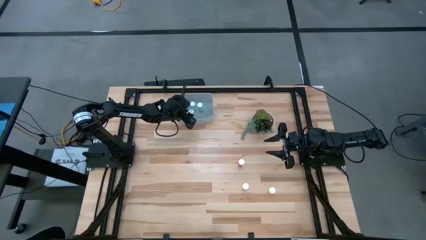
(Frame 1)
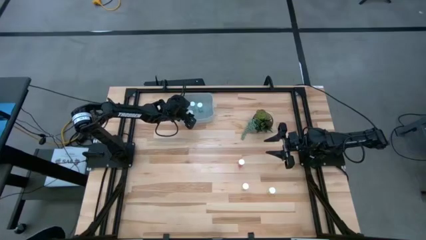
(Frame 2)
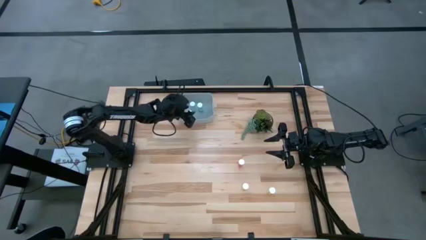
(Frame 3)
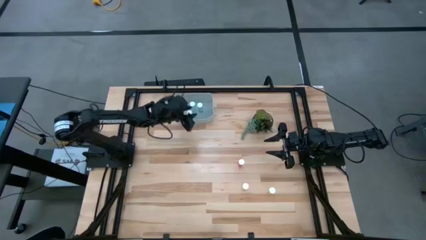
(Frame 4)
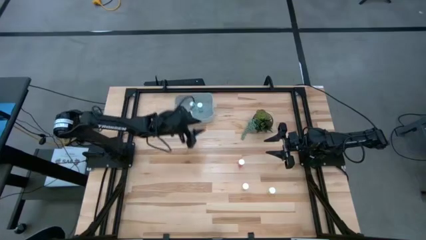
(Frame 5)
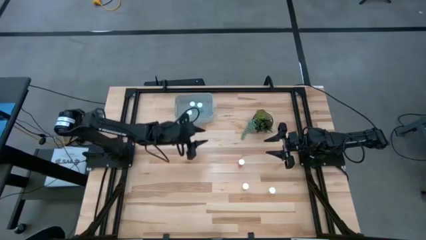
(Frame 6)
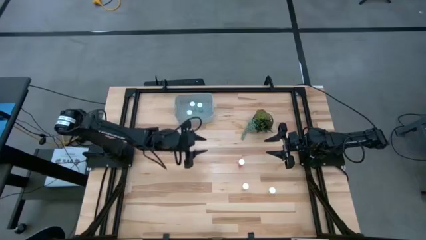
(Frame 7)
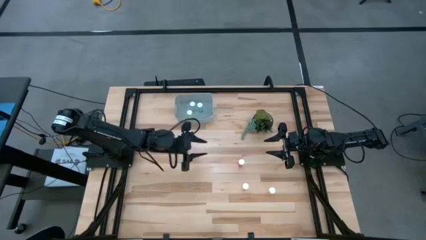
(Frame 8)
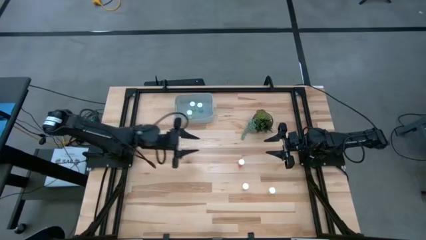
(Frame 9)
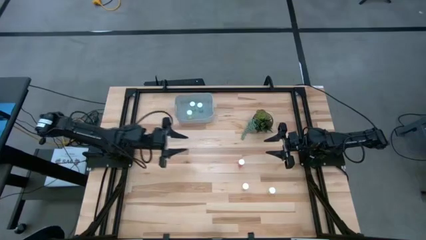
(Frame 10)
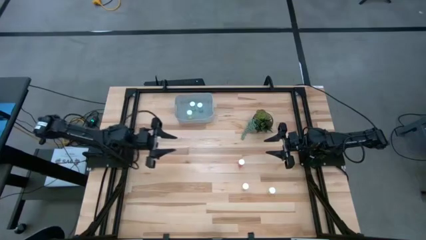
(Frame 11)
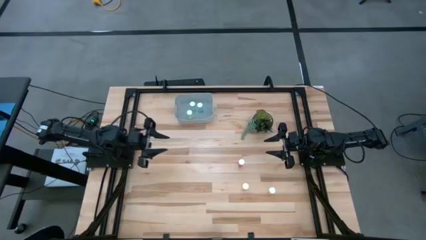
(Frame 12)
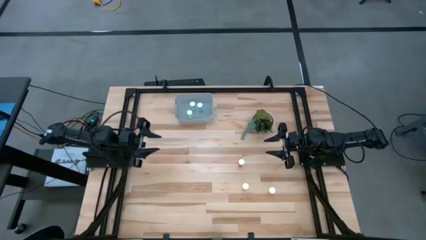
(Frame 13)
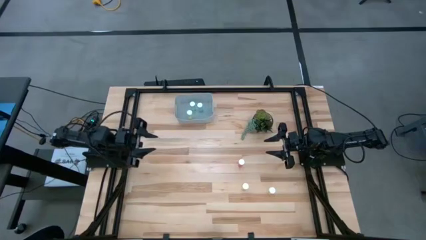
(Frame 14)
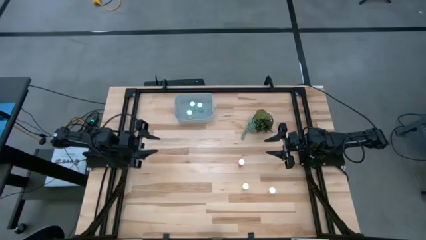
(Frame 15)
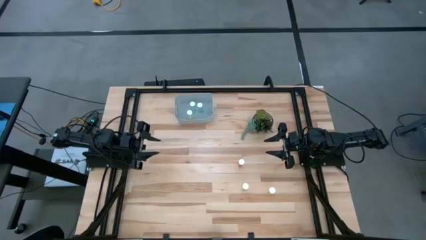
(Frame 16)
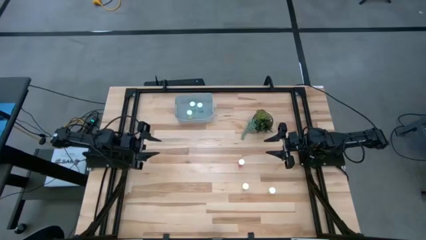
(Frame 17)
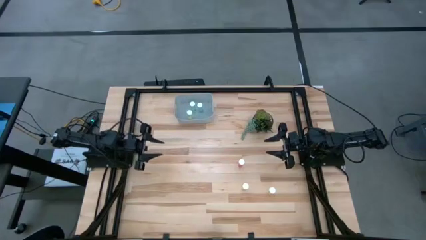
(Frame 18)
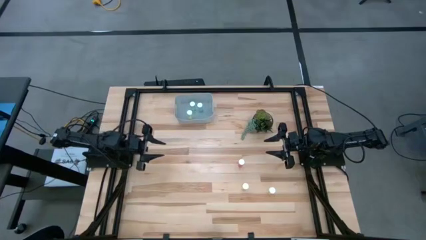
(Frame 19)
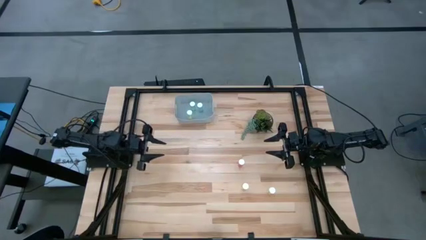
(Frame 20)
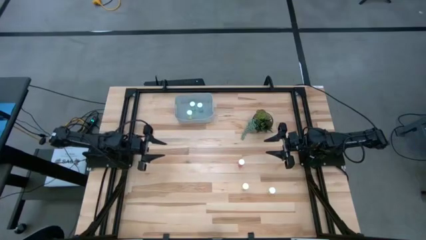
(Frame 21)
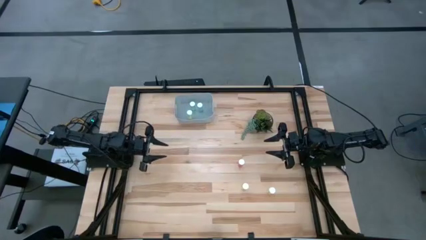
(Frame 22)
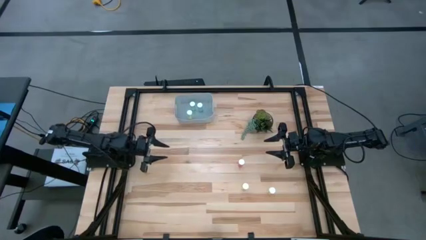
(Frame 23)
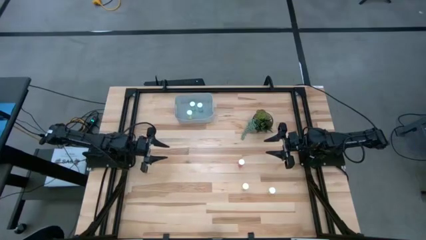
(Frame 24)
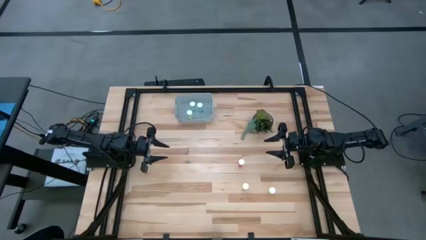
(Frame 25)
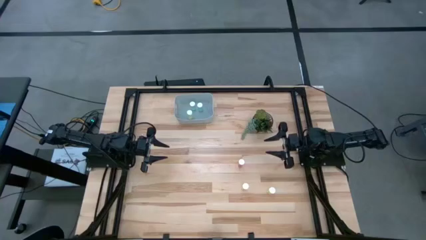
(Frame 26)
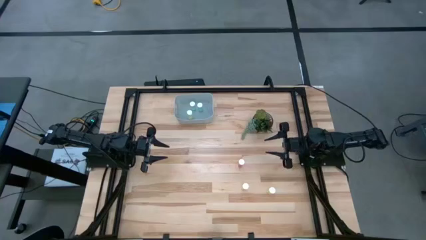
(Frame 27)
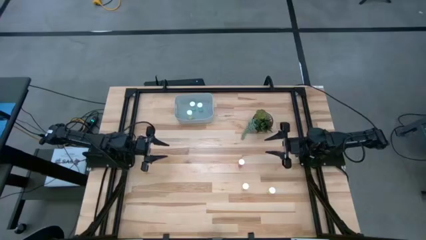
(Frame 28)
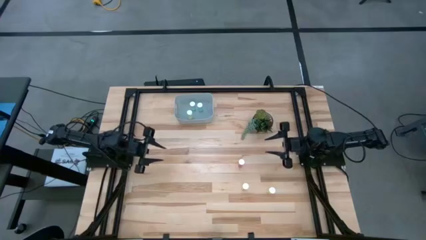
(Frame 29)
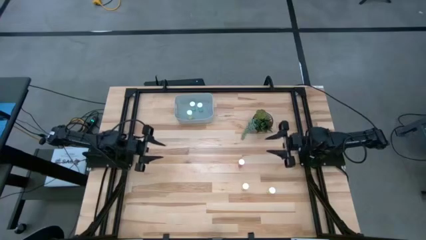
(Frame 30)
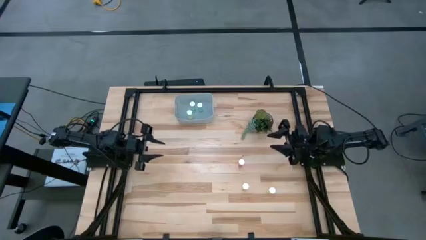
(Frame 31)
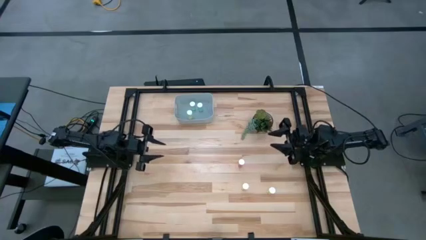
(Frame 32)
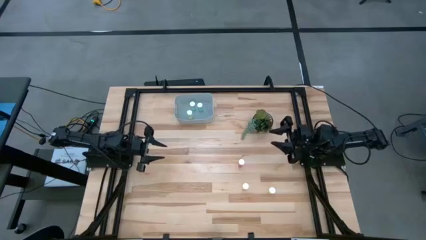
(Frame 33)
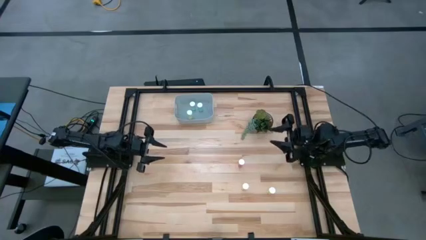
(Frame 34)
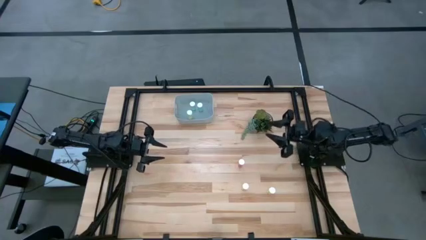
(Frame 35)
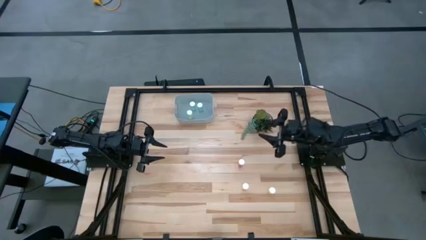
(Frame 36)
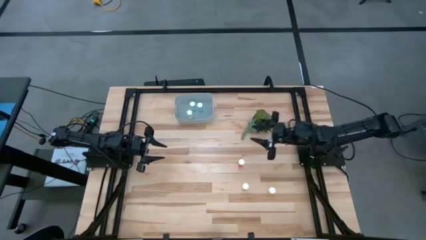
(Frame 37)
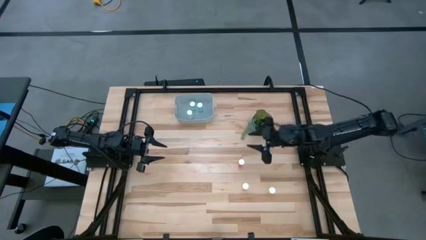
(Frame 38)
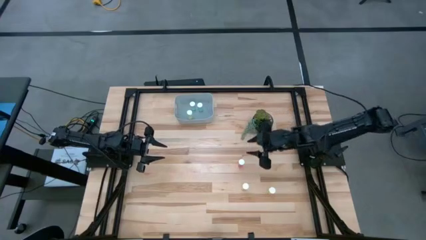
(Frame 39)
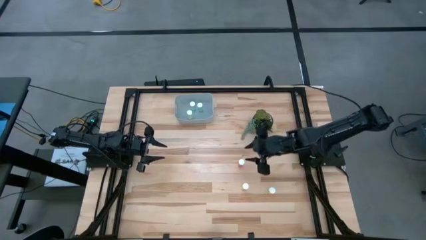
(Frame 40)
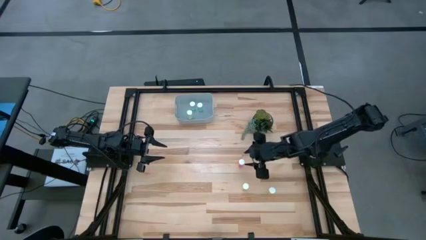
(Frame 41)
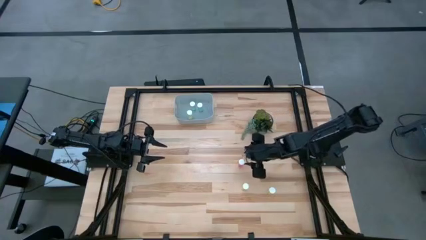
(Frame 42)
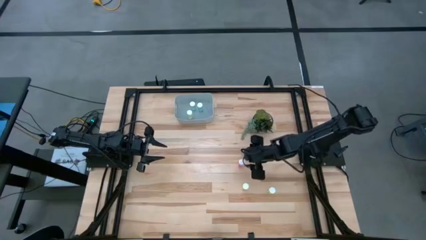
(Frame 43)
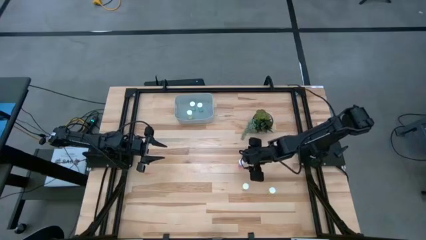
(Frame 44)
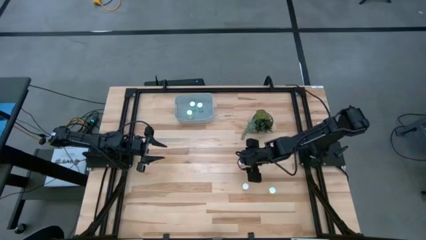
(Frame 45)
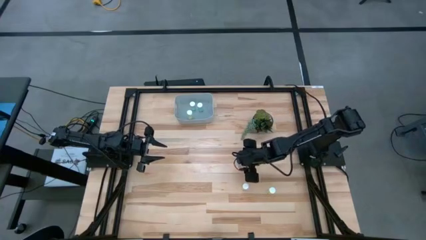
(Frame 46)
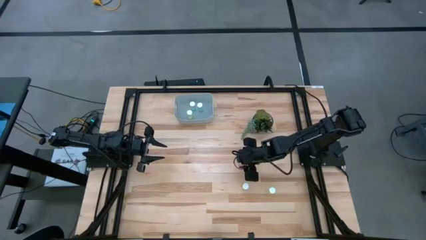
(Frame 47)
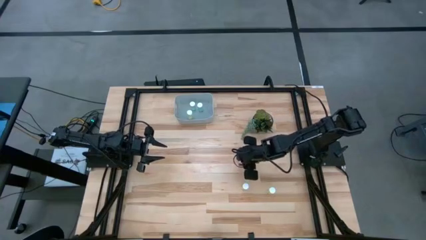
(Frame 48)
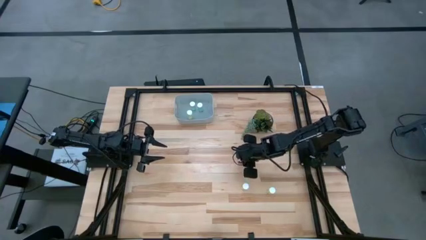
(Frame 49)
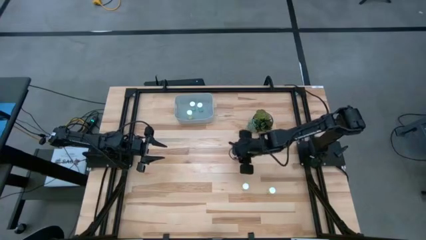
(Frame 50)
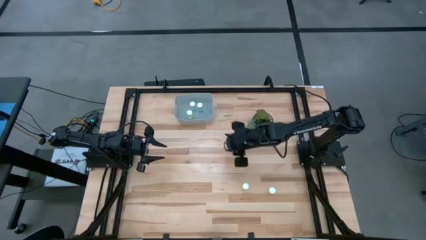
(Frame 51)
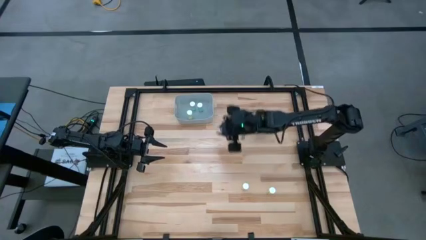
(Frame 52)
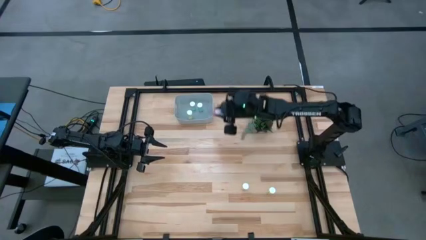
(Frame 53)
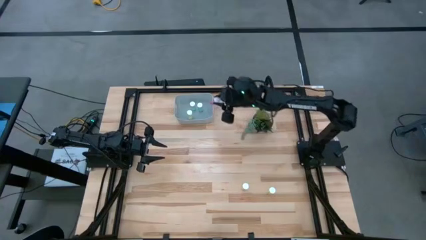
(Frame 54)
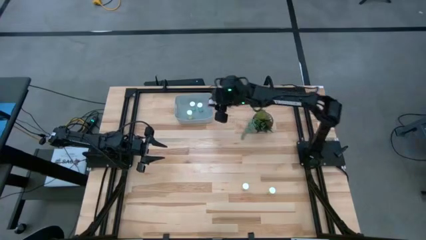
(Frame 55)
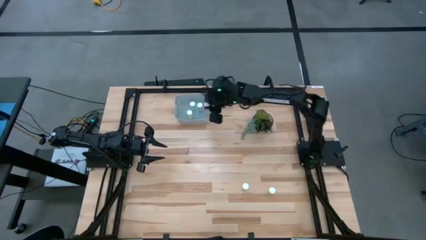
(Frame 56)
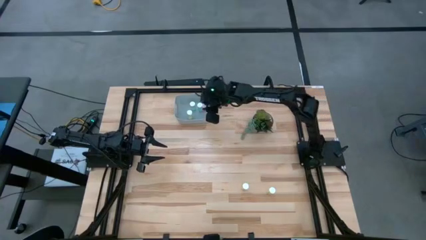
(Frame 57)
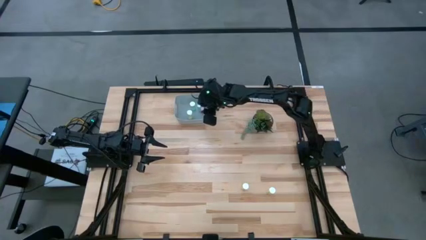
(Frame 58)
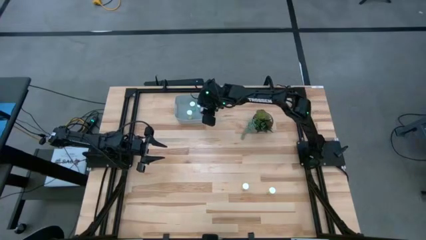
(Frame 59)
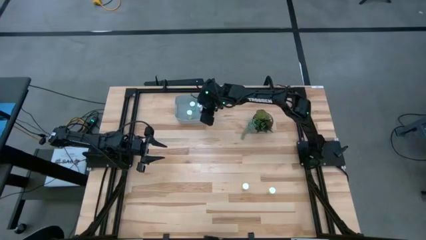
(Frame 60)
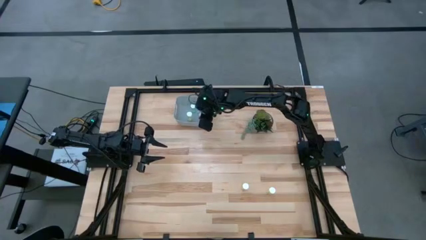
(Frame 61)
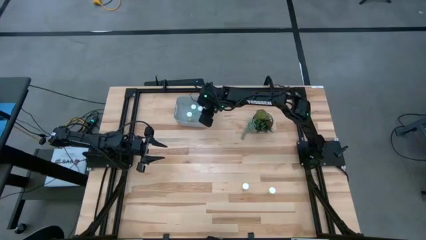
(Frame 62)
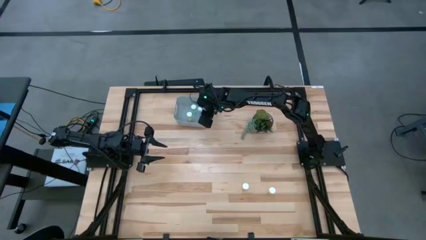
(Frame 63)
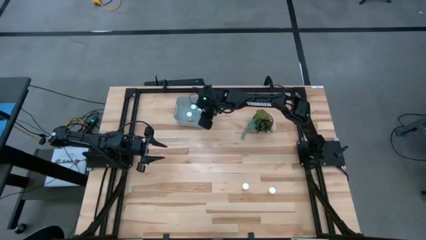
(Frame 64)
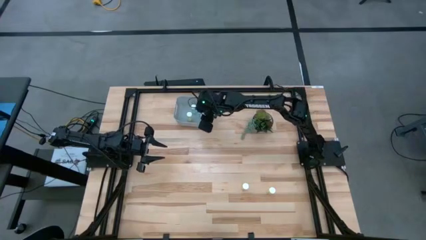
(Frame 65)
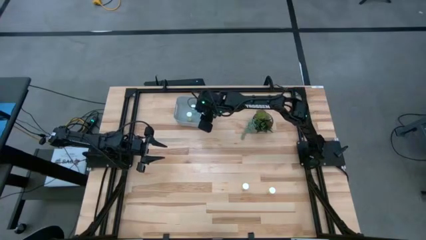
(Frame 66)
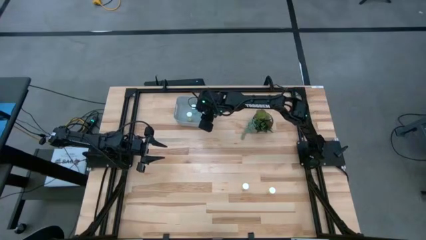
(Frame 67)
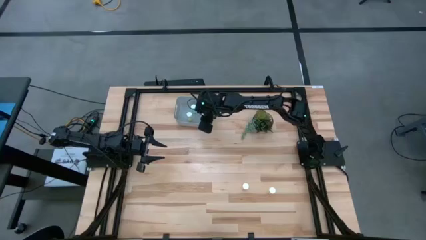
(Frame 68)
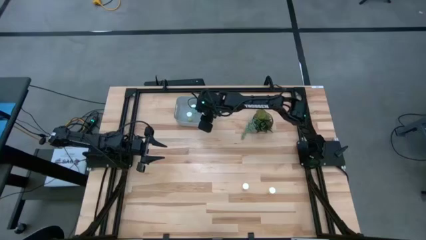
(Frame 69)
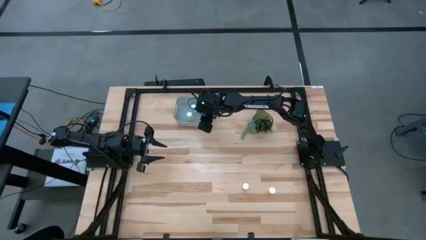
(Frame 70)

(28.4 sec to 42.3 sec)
Task: Pick and place pill bottles into a basket
Put the pink pill bottle into the gray container
